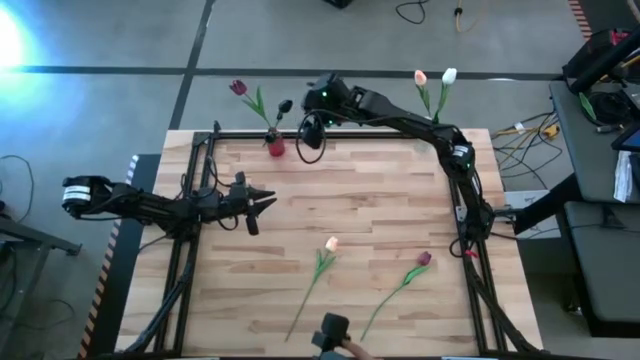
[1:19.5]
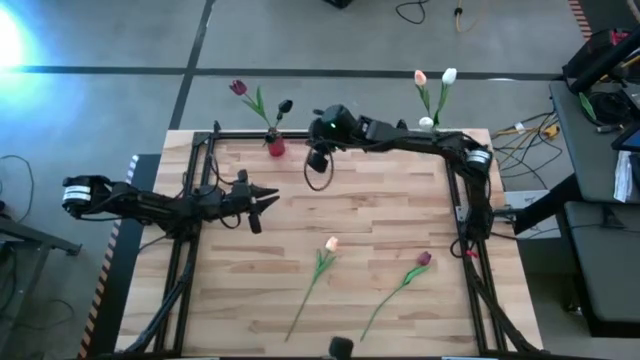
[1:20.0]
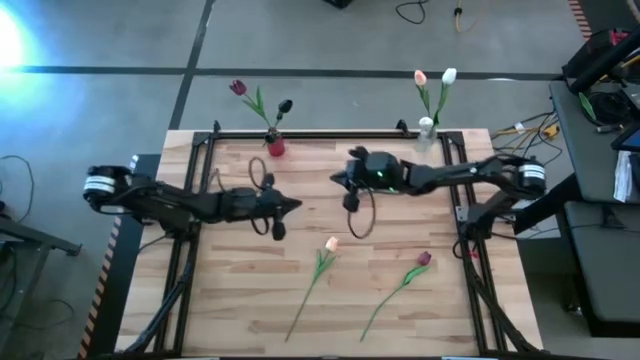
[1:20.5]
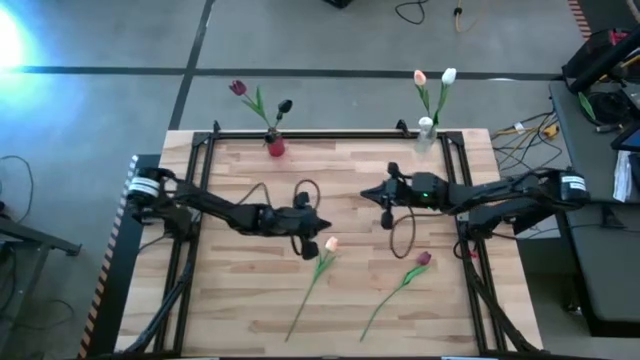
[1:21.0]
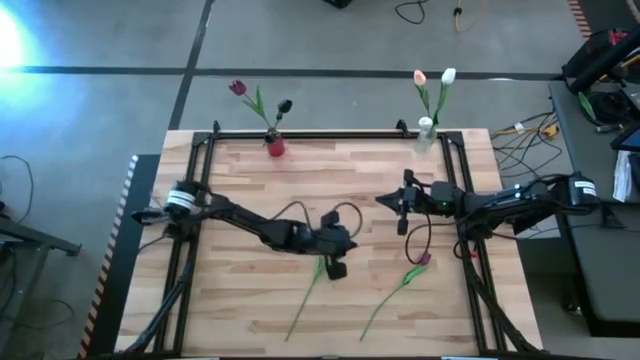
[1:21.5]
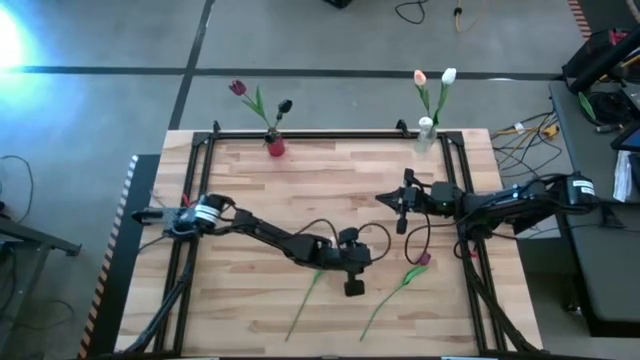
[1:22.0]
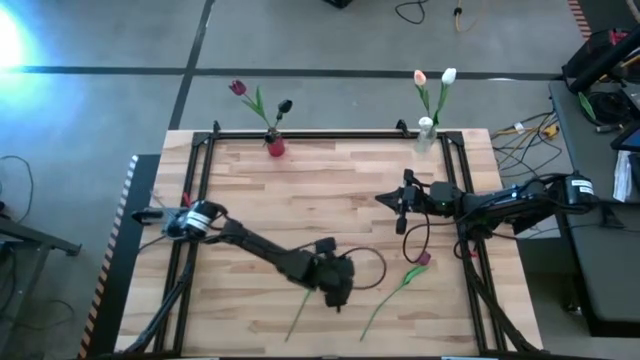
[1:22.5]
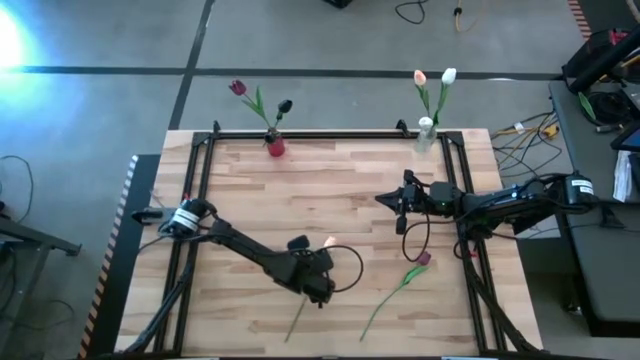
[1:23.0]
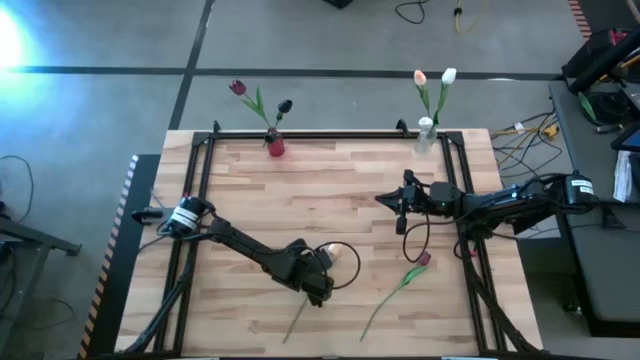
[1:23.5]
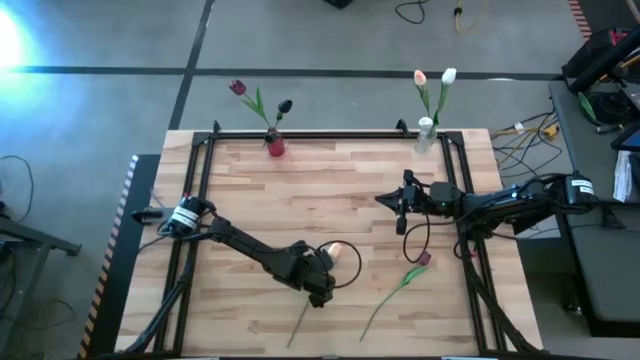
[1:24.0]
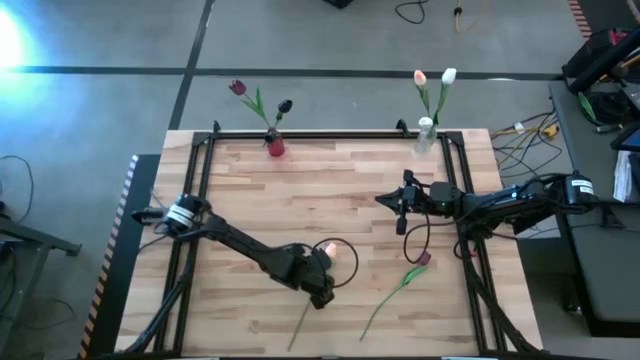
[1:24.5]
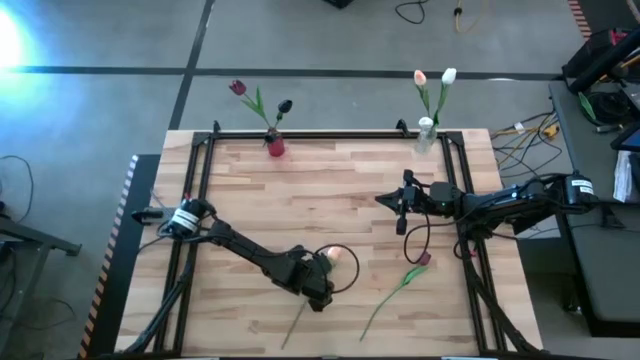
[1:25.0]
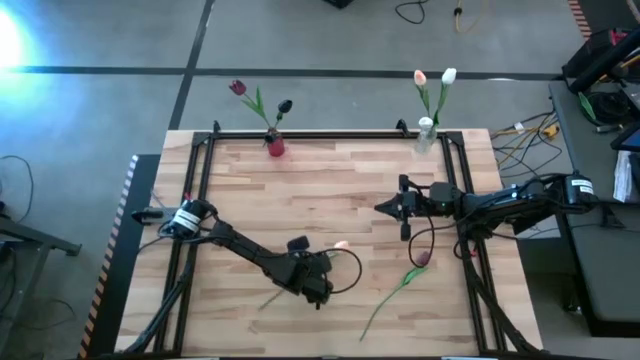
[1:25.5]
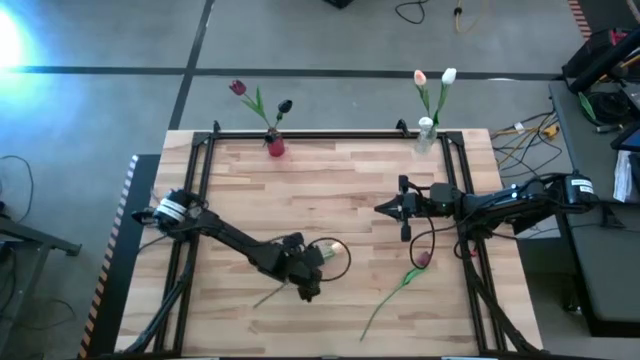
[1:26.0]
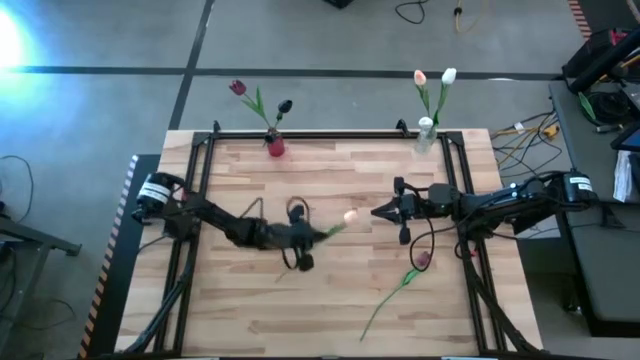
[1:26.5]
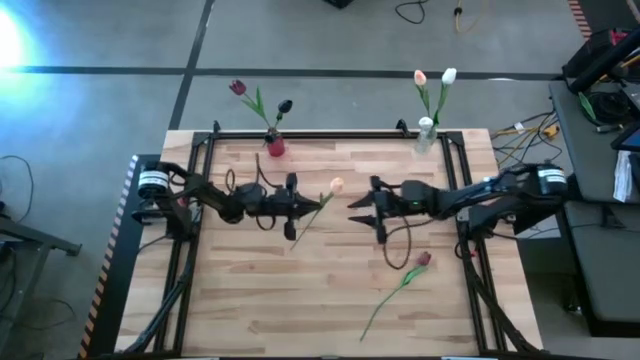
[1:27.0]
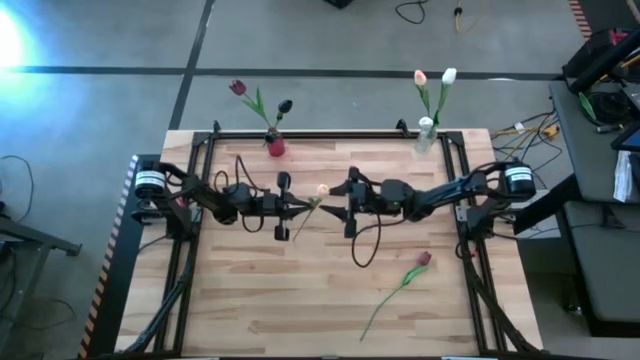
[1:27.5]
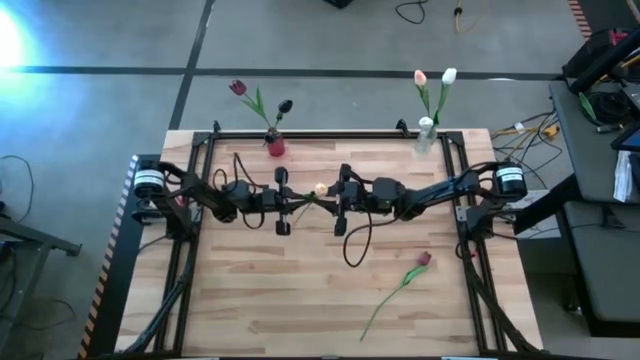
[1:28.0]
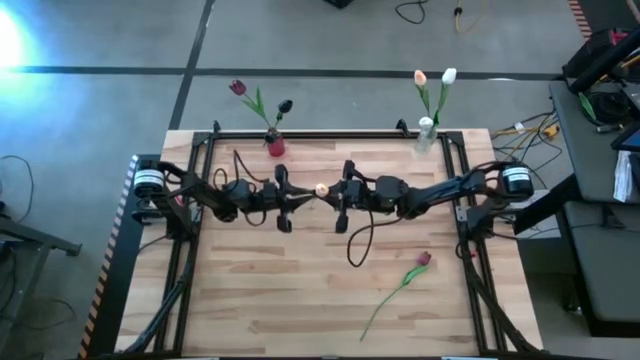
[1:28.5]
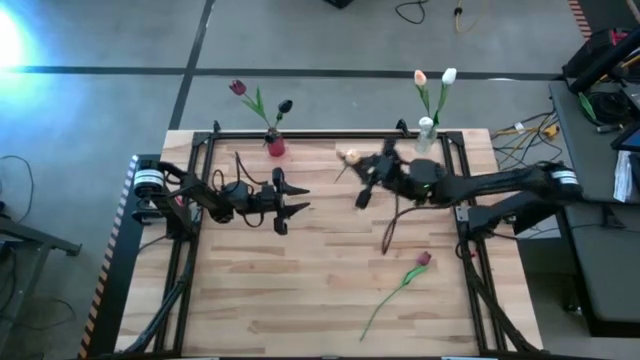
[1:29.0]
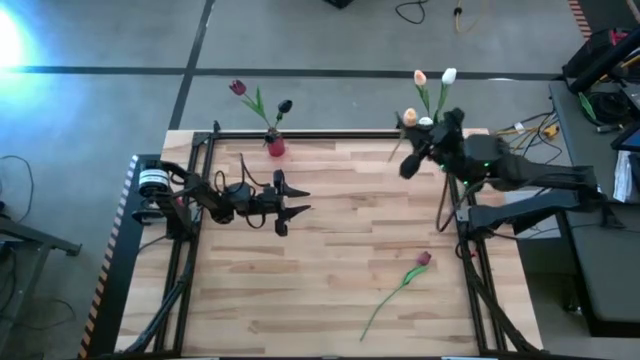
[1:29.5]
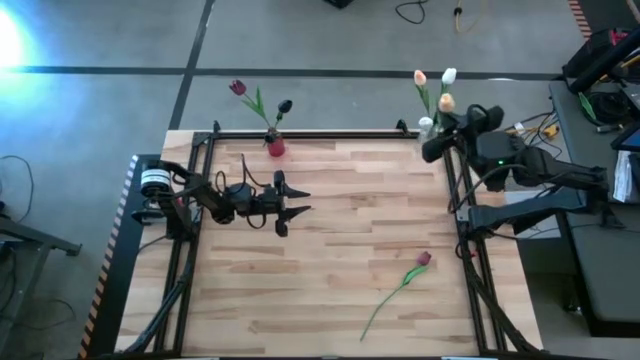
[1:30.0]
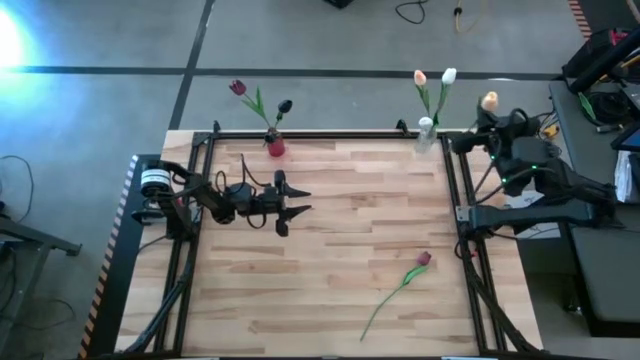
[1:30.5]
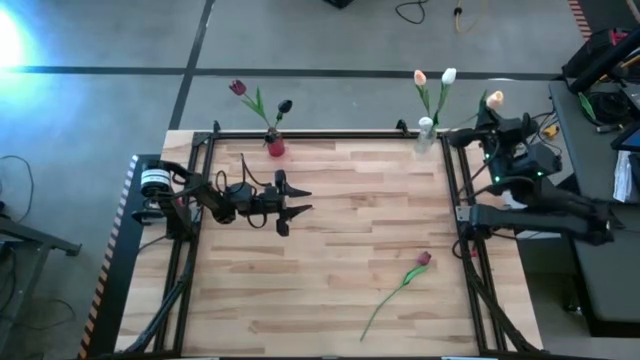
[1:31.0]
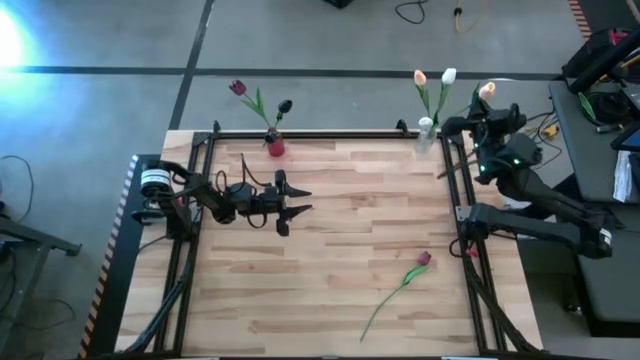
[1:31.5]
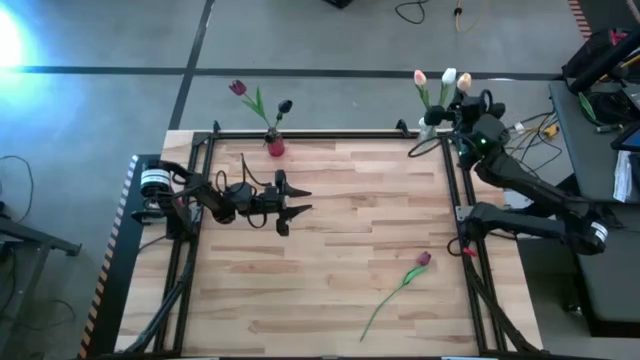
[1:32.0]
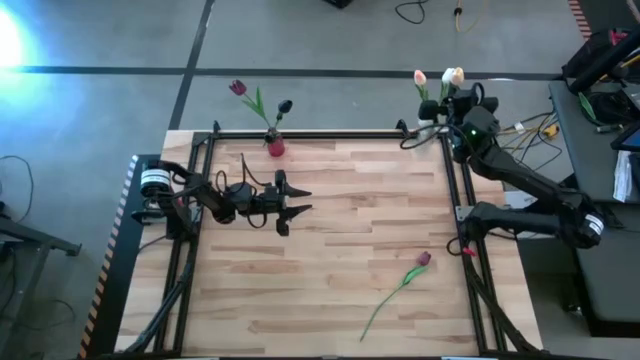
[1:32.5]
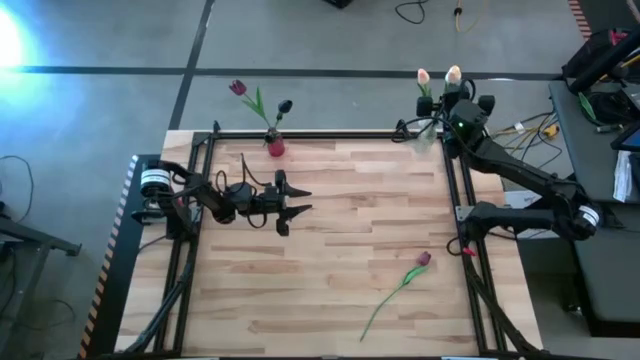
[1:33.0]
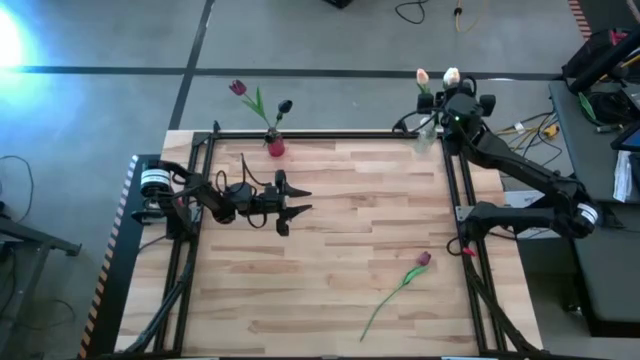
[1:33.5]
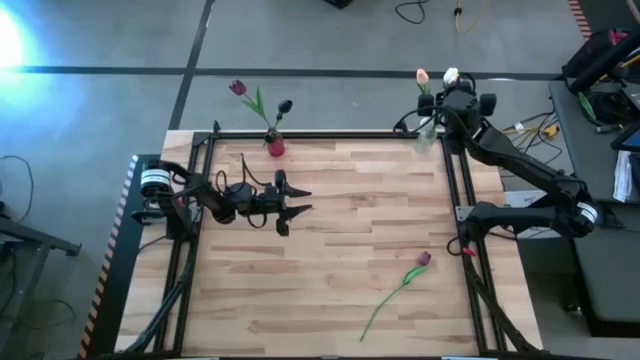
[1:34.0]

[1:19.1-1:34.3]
Task: Sort flowers into vase by color
Put the orange tulip into the transparent vase

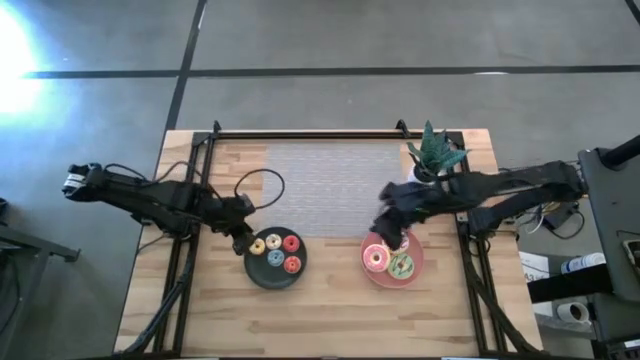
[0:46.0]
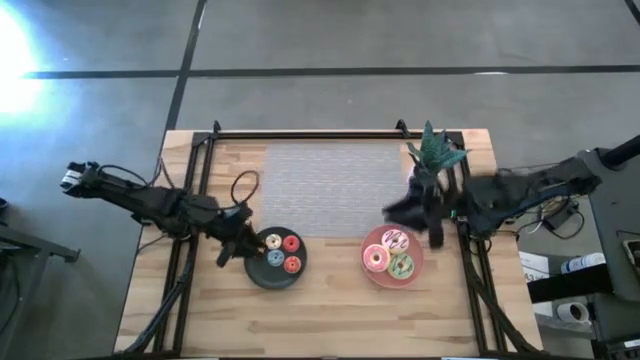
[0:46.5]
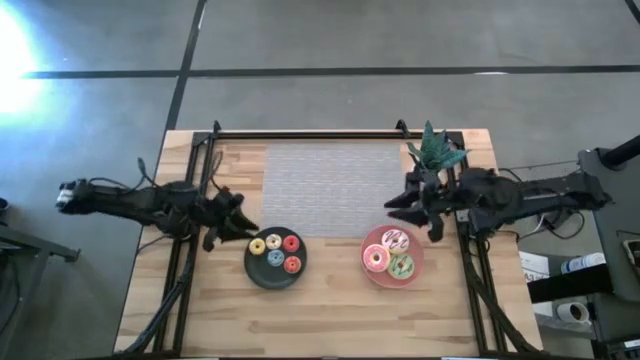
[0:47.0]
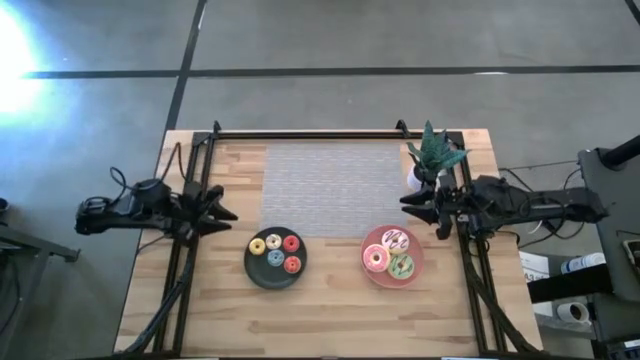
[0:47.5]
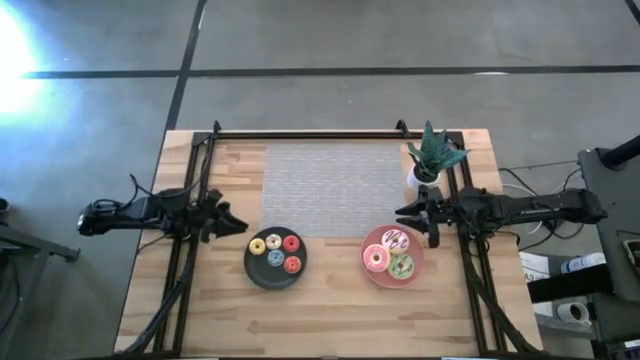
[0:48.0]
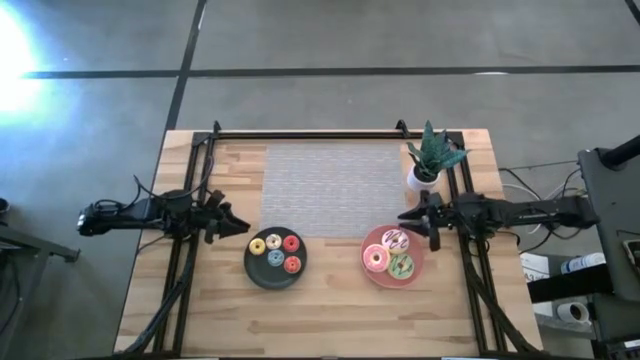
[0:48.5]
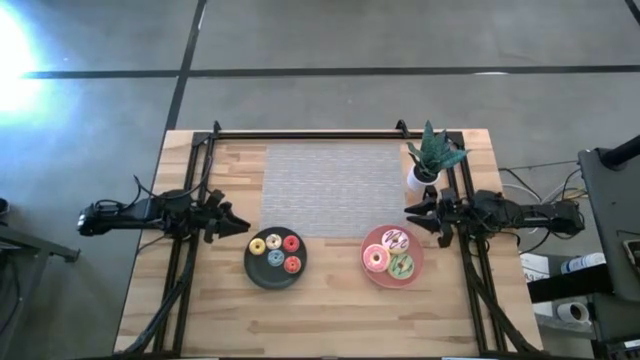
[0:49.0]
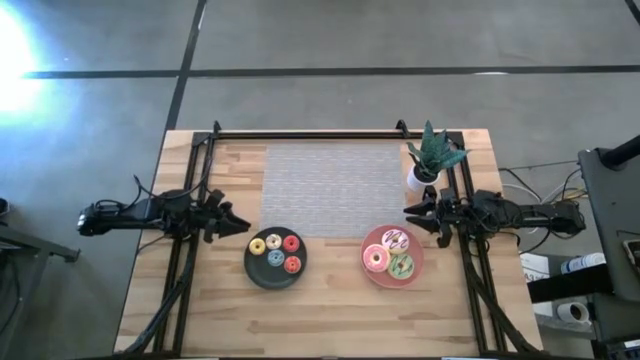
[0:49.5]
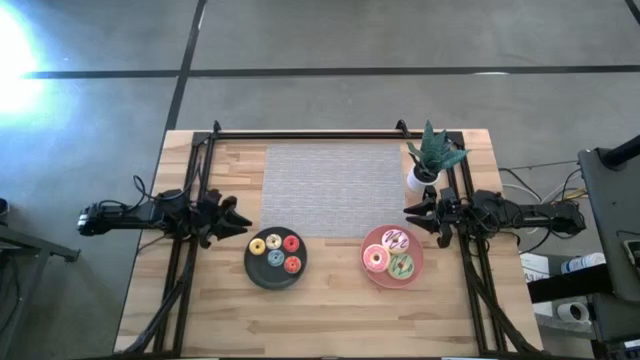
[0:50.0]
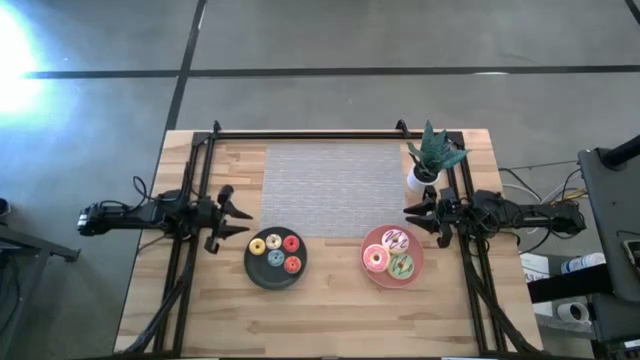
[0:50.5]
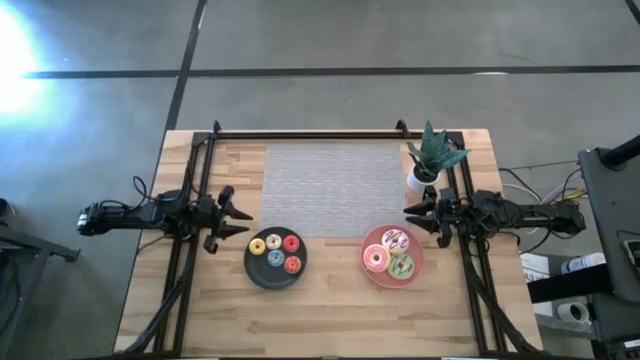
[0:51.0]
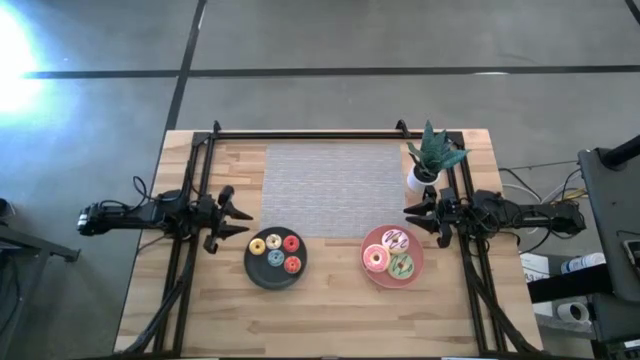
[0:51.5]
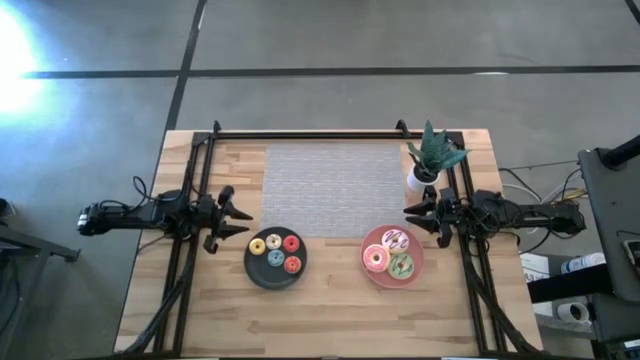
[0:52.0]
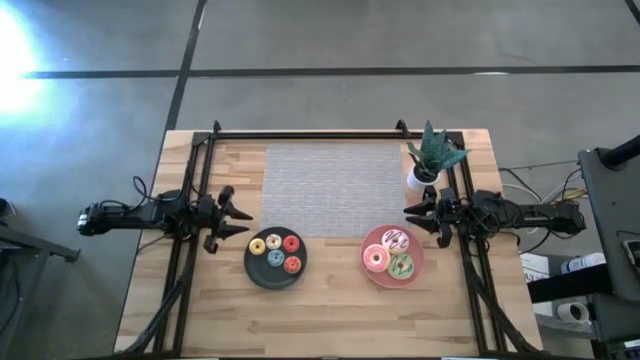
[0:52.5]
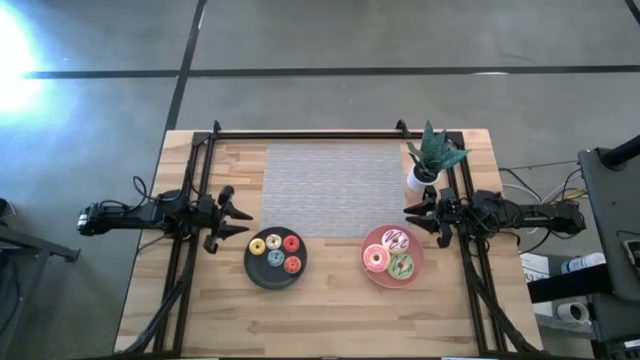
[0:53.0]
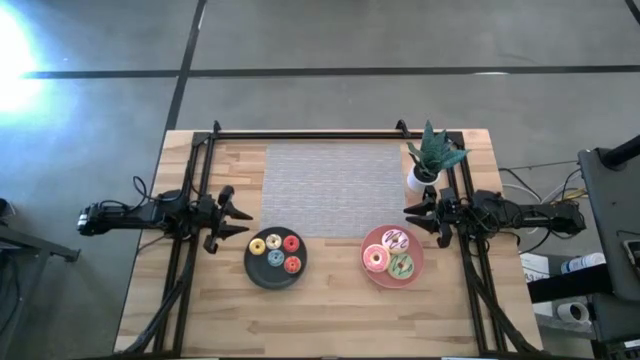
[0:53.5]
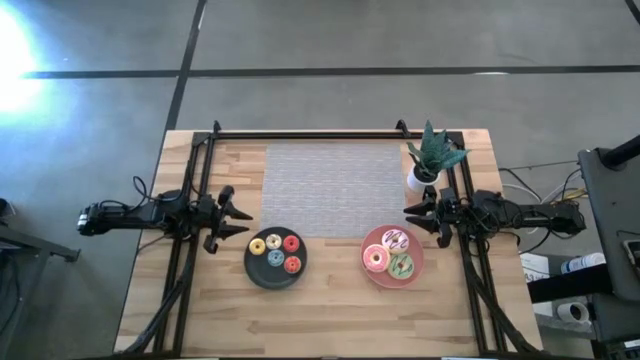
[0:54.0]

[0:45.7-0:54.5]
Task: Pick & Place donuts
Return to Home Position
